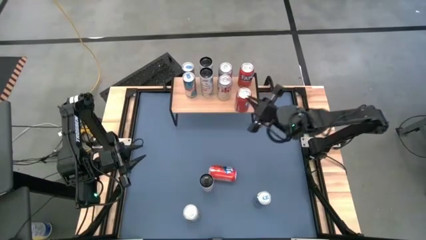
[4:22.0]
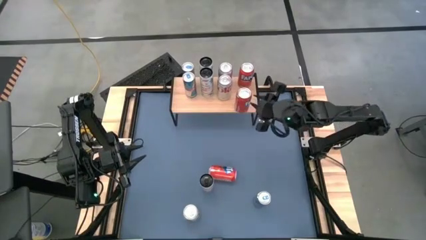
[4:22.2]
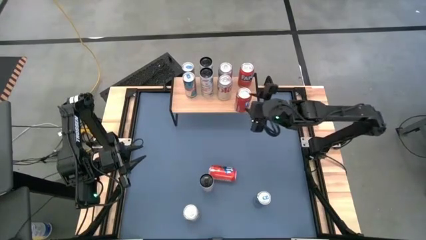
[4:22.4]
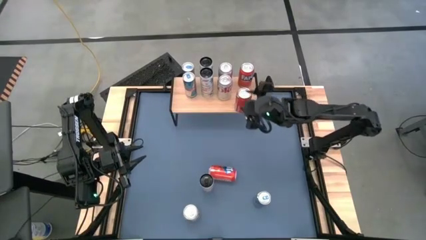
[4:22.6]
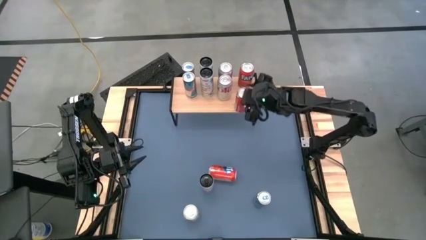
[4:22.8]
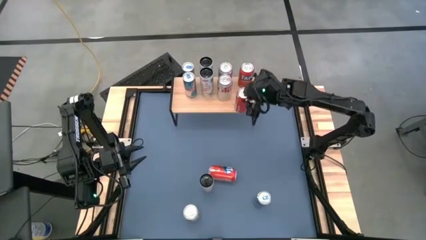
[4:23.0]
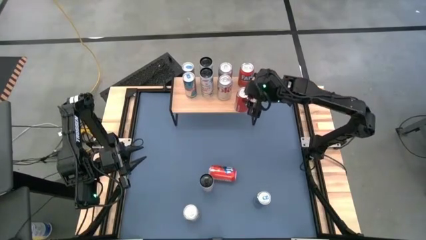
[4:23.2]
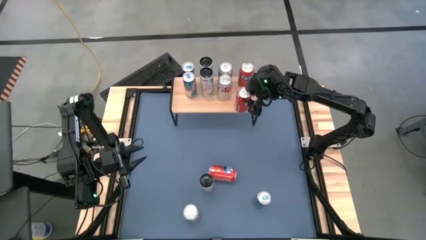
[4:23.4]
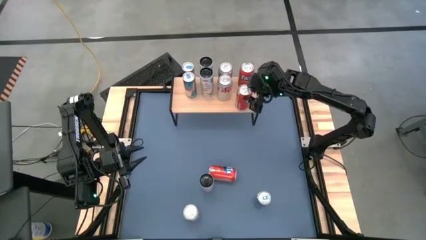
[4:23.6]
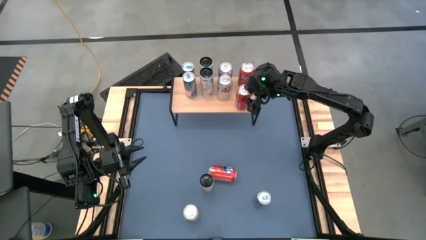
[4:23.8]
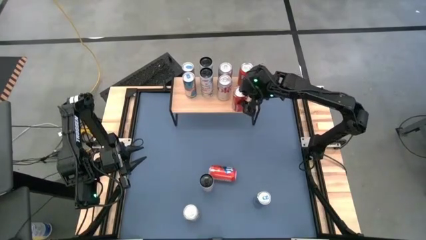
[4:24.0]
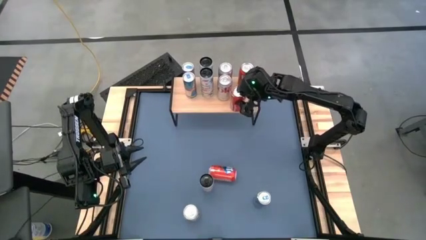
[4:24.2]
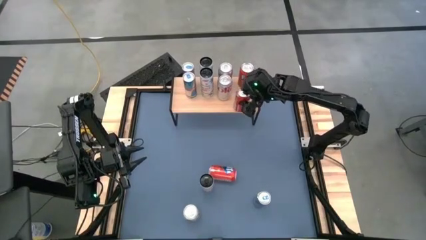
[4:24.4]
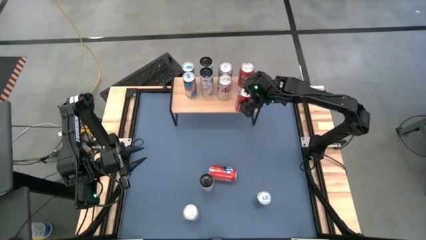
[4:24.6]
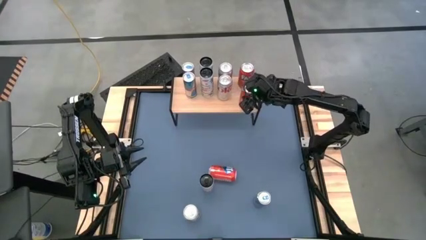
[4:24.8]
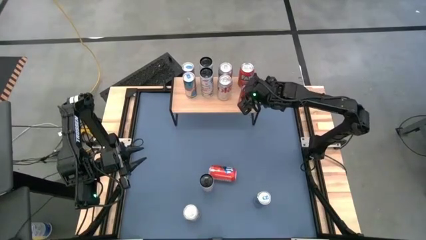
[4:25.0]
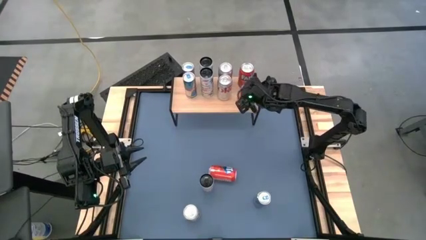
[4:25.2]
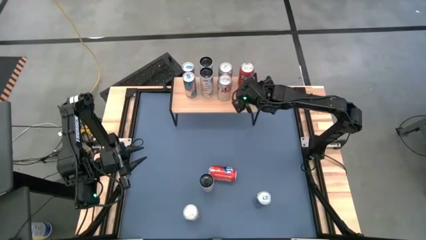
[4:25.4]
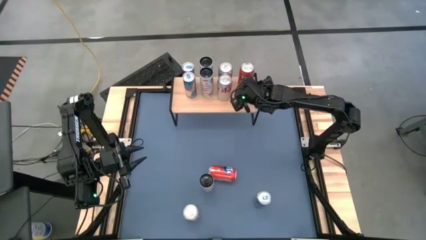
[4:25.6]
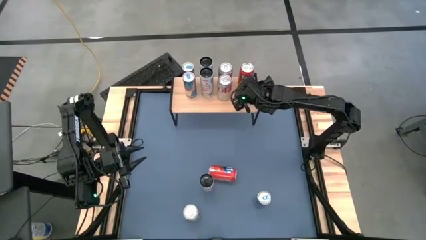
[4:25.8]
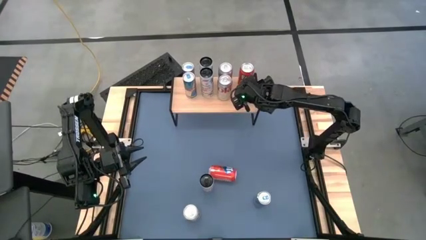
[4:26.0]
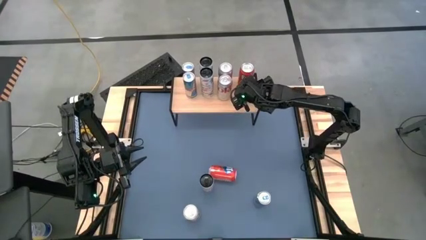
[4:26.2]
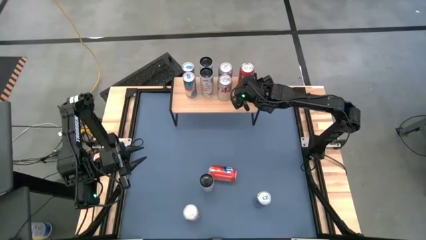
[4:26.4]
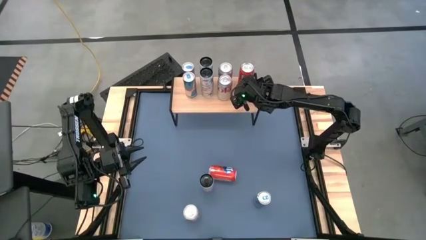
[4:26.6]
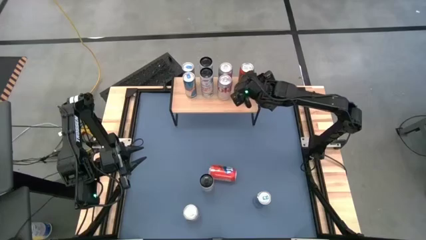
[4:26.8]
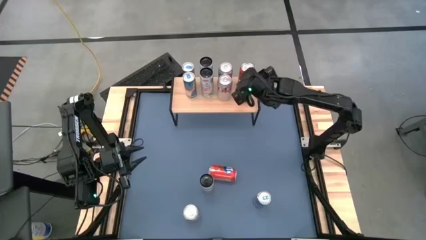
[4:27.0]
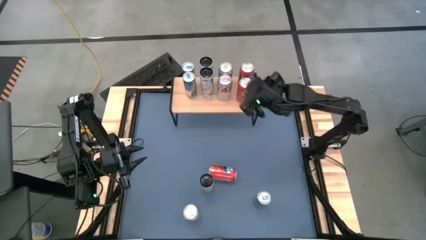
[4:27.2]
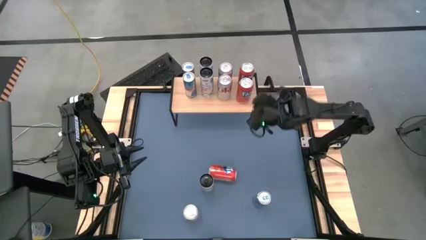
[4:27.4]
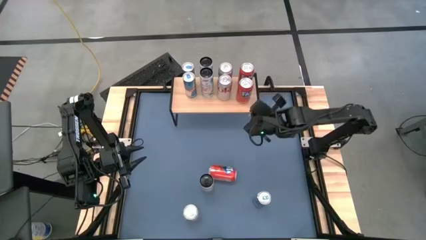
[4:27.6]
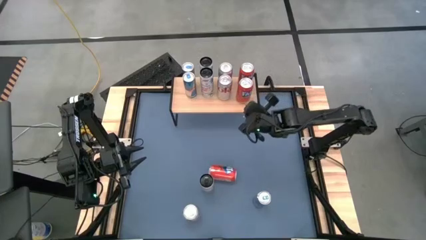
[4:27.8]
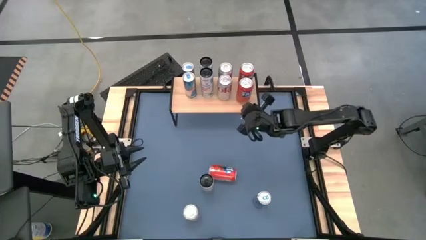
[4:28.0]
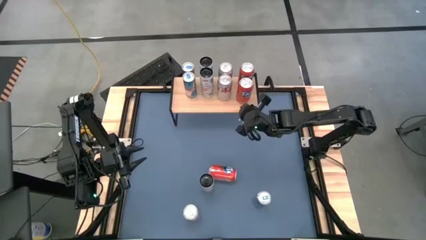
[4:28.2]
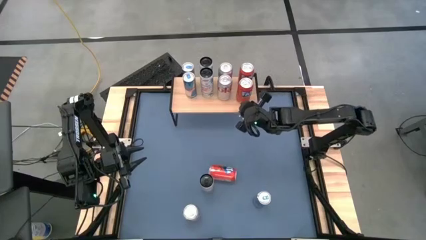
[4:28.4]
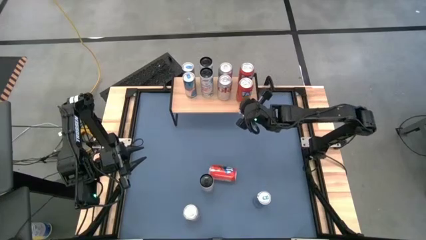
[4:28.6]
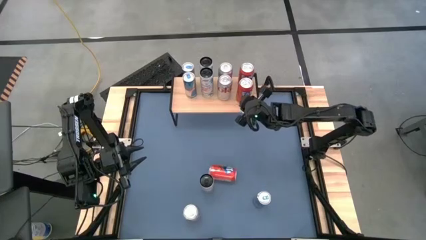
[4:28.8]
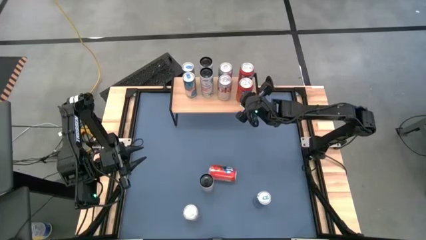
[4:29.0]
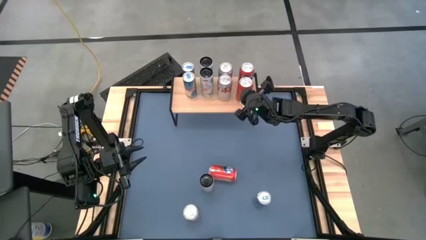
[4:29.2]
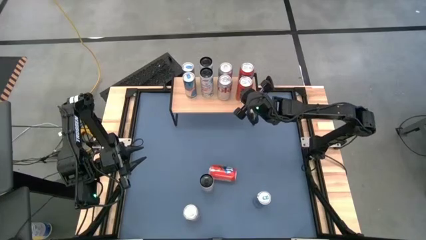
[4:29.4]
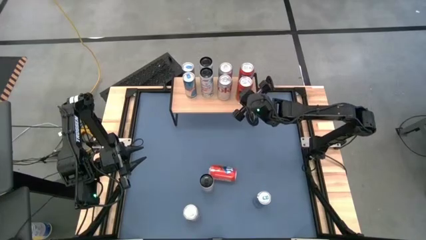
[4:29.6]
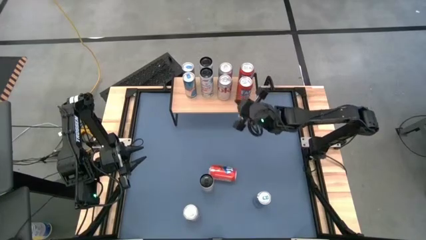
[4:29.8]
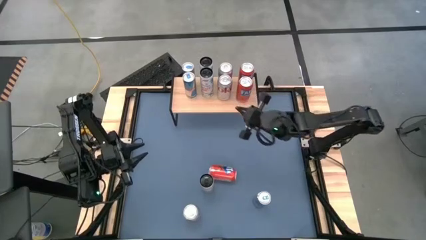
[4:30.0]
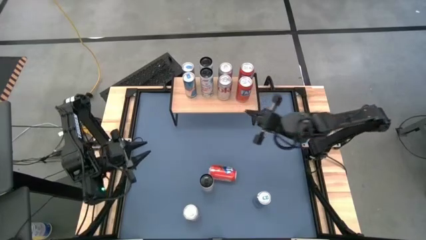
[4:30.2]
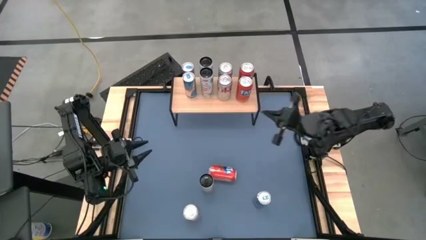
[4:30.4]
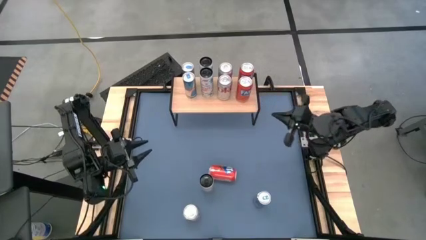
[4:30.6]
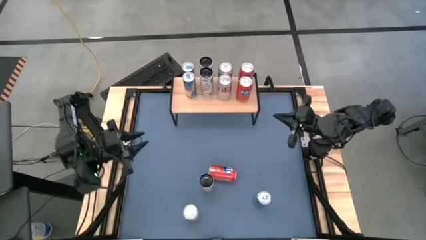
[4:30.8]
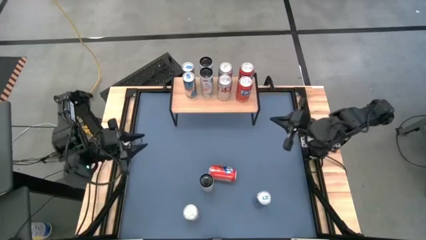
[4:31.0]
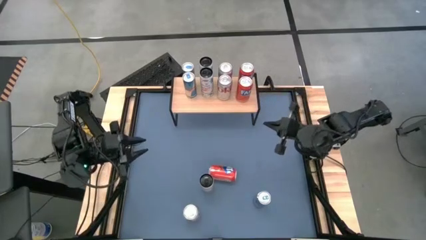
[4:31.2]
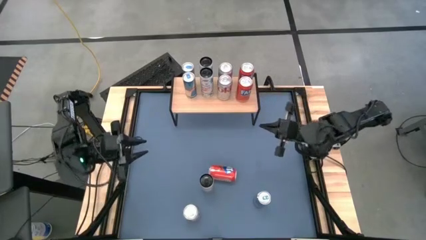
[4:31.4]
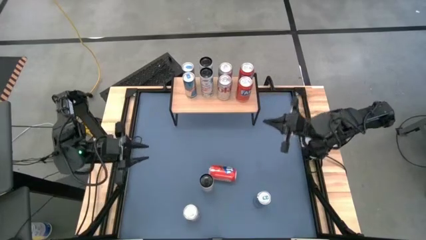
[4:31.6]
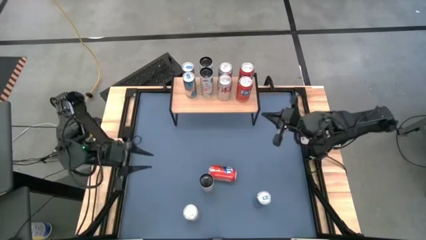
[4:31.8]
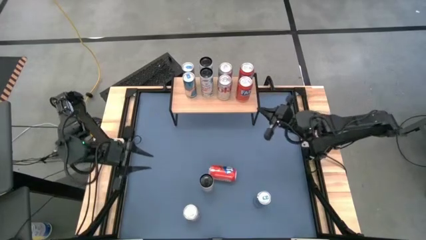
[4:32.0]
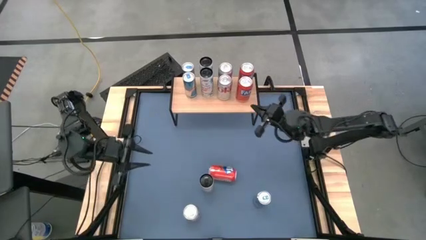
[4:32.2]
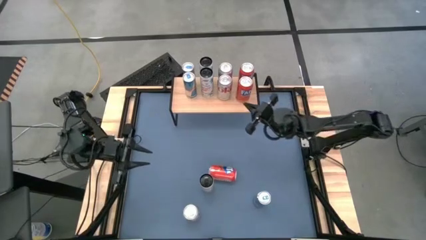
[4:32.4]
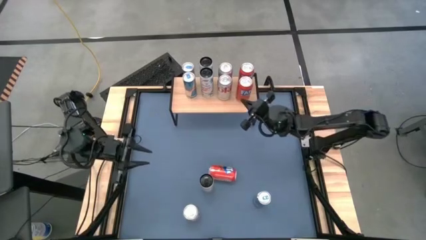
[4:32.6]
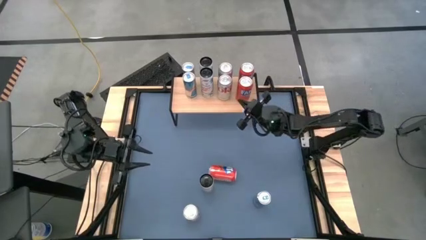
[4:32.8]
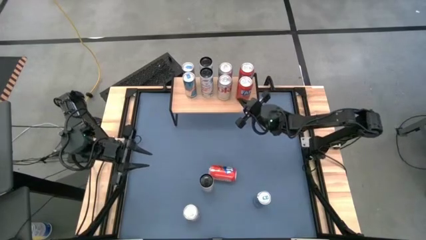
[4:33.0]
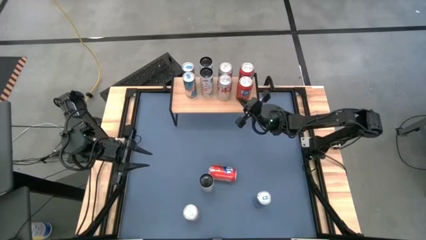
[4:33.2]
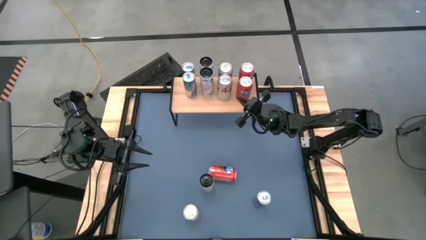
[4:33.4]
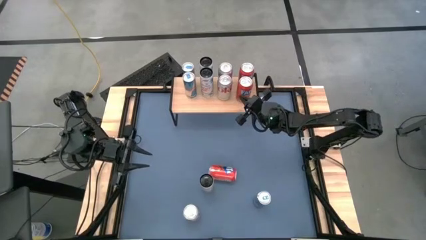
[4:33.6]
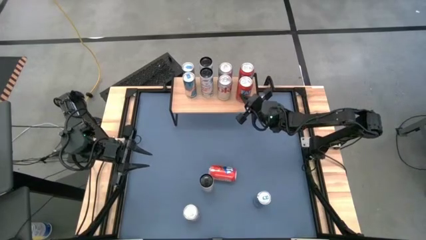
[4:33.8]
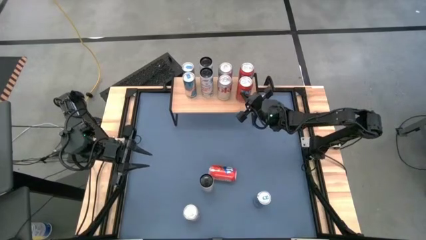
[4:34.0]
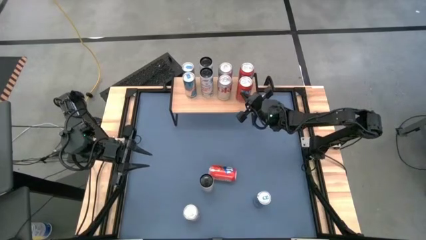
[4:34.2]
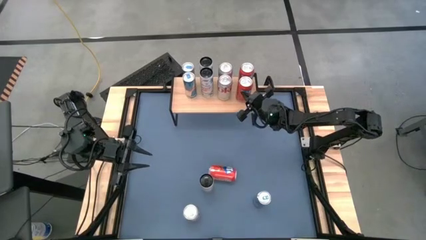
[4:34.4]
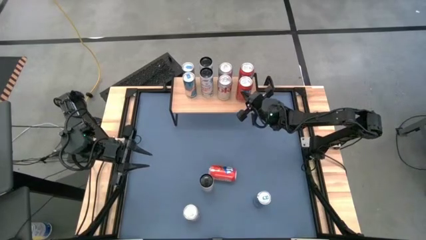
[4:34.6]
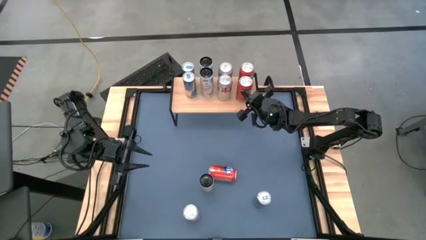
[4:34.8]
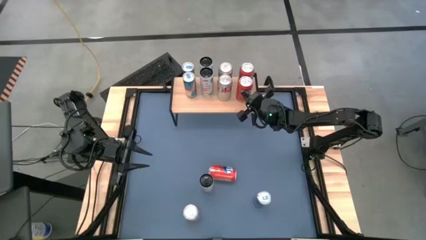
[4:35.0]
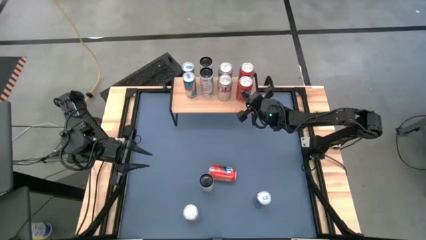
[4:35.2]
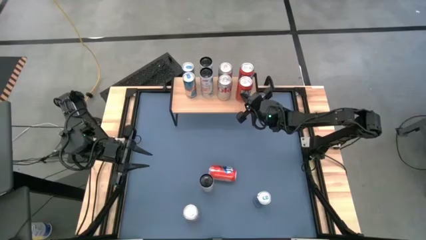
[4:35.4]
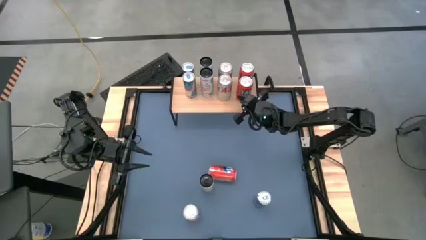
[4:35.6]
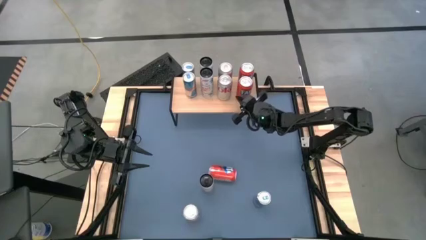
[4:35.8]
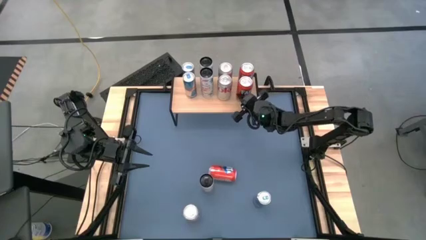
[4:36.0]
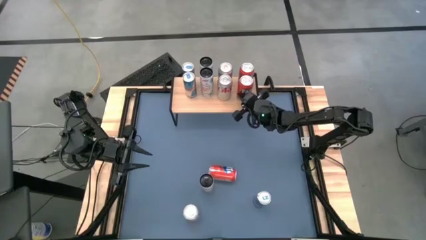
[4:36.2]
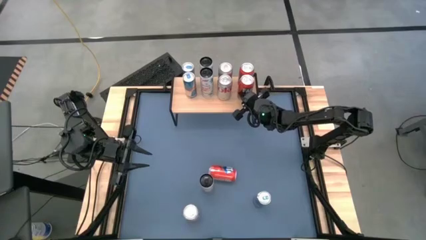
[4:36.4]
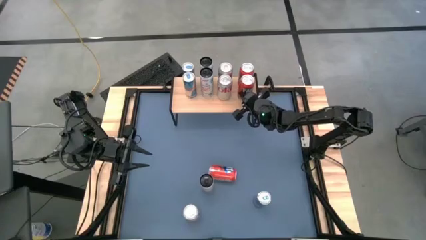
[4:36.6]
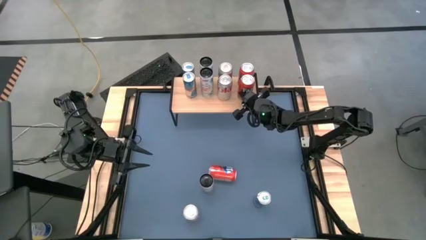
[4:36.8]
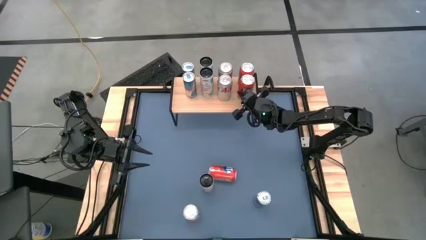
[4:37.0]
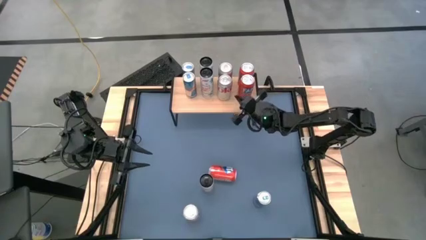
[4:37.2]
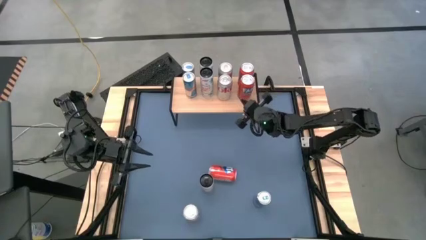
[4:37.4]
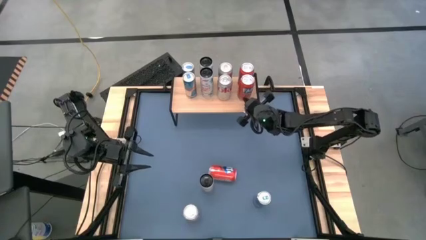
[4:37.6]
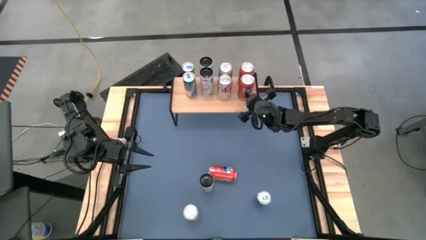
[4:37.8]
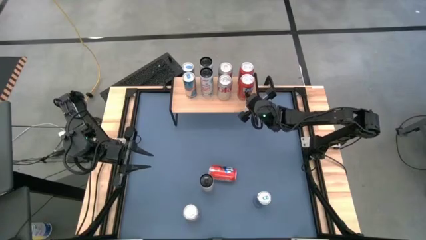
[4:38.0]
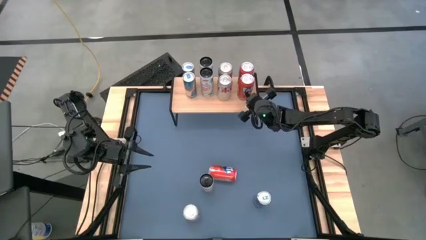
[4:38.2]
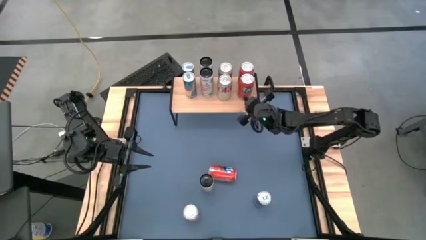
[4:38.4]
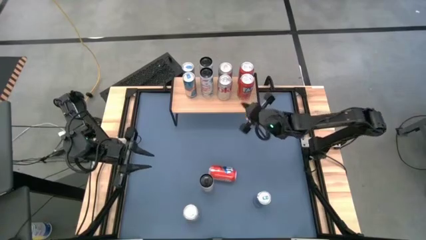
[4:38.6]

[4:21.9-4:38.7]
Task: Place canned beverage on shelf
Put the top left orange soda can on the shelf aligned with the other orange soda can
